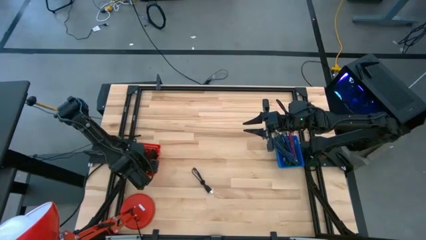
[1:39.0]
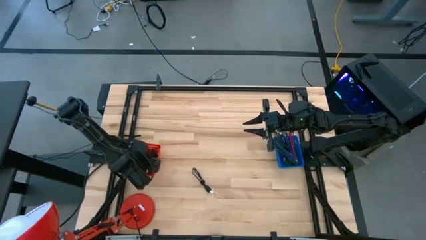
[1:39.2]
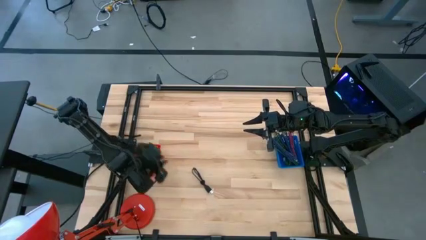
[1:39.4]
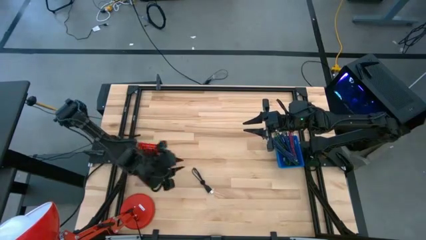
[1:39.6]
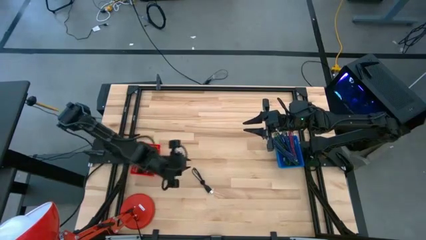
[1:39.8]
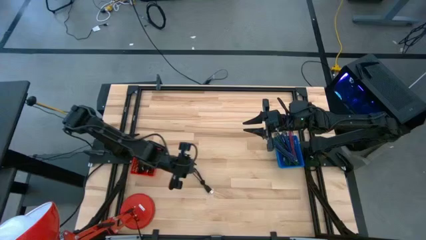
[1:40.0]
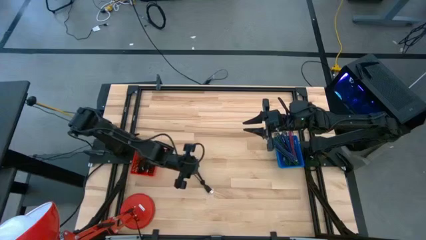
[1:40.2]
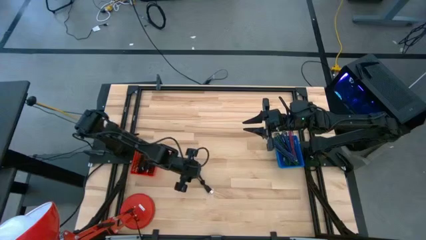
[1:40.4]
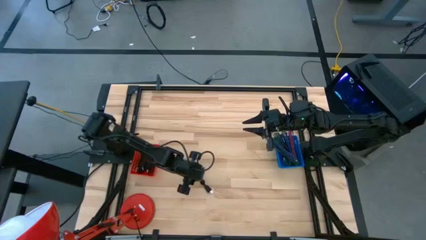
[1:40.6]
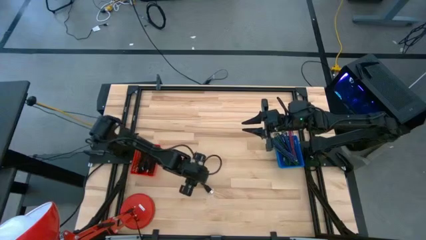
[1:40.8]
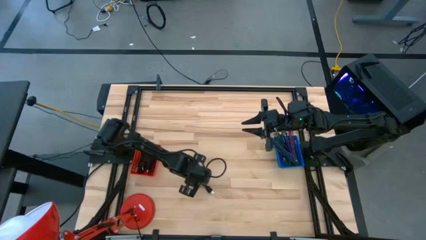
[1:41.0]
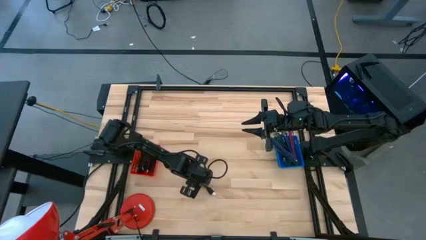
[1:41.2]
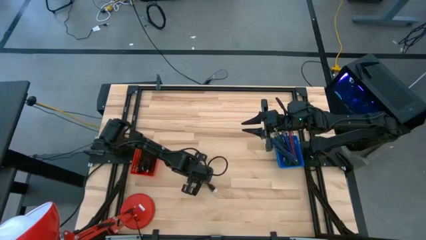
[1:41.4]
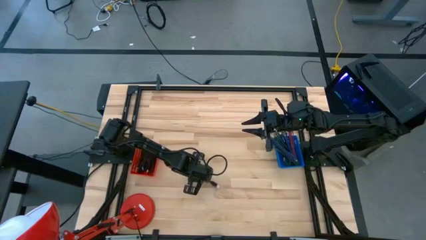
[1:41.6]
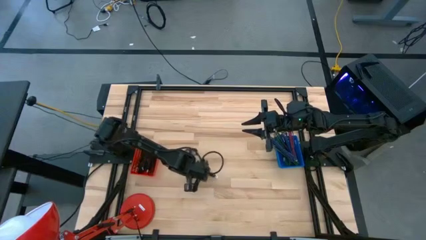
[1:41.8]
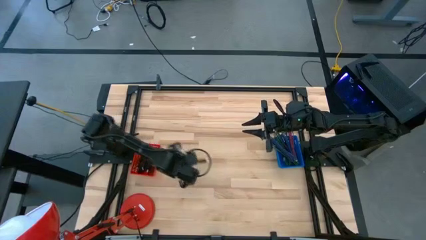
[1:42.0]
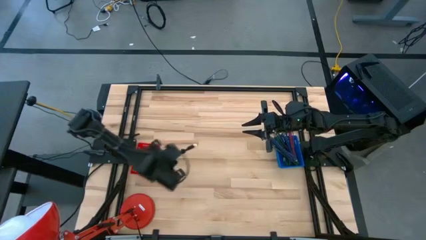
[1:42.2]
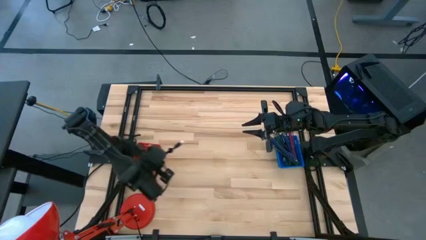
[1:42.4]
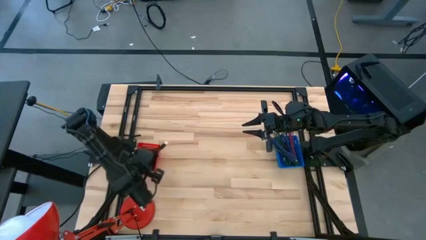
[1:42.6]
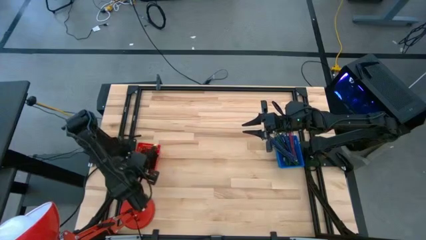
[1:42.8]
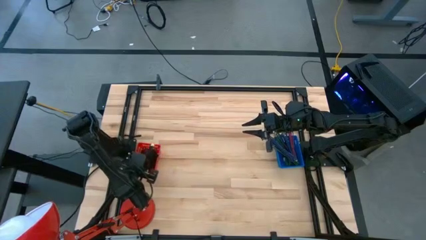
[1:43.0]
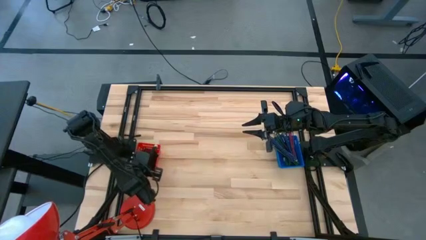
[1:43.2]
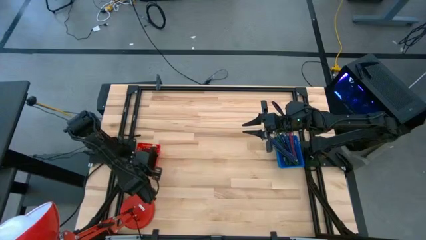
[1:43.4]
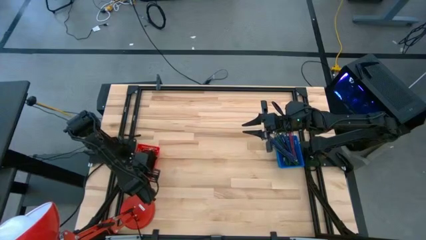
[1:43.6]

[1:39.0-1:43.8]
Task: Pick & Place USB Port
Put the black charger cable into the red bin

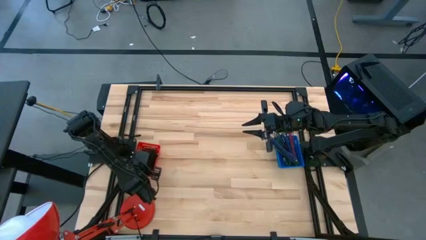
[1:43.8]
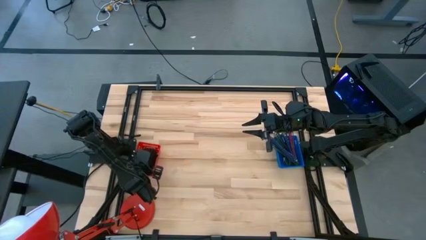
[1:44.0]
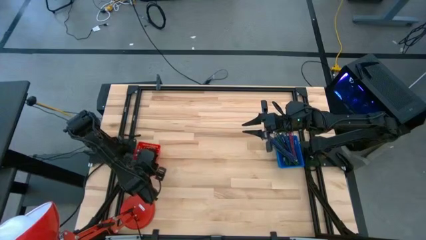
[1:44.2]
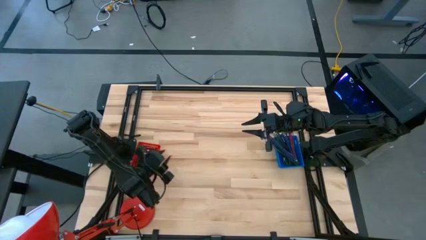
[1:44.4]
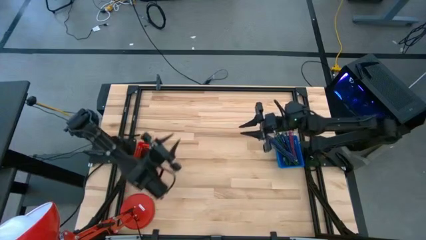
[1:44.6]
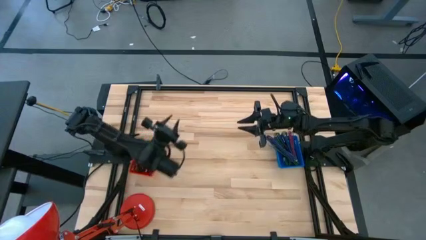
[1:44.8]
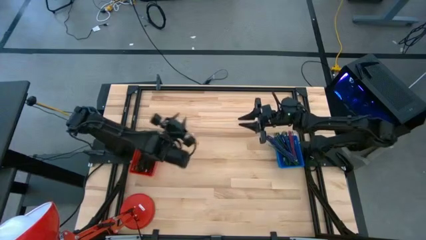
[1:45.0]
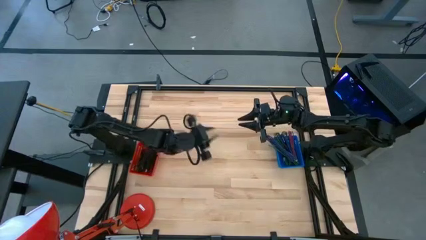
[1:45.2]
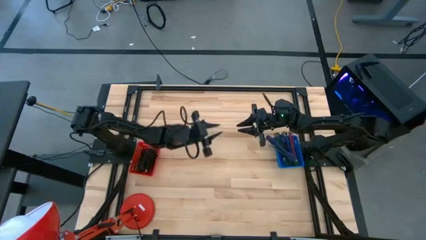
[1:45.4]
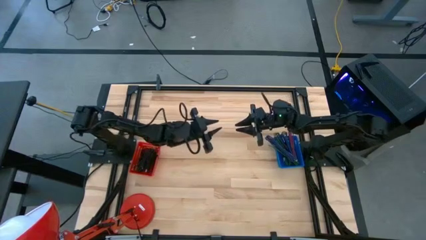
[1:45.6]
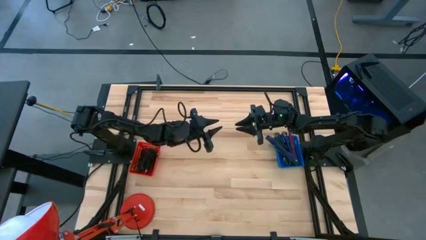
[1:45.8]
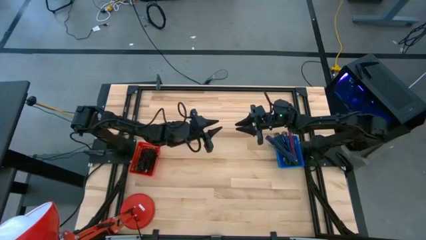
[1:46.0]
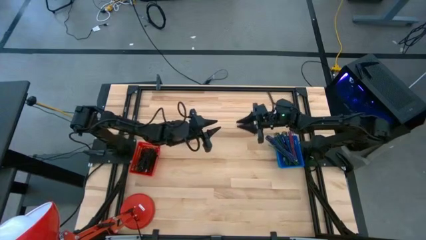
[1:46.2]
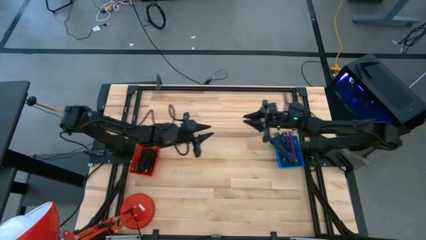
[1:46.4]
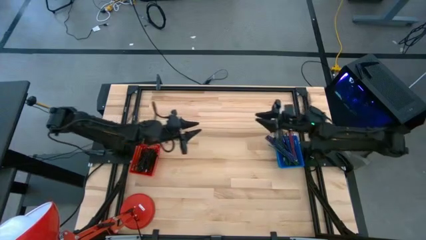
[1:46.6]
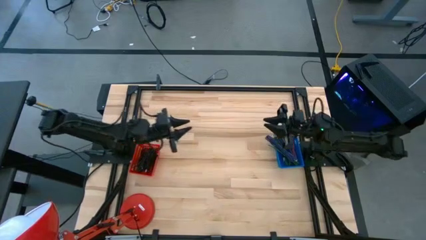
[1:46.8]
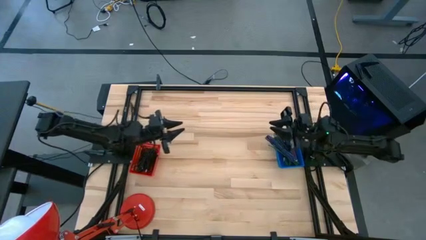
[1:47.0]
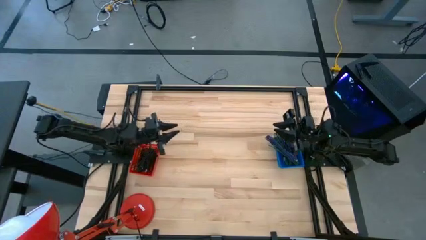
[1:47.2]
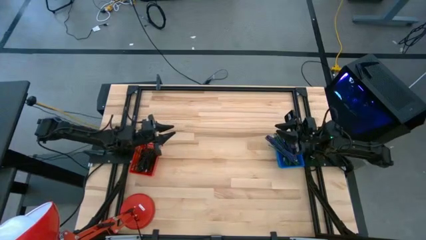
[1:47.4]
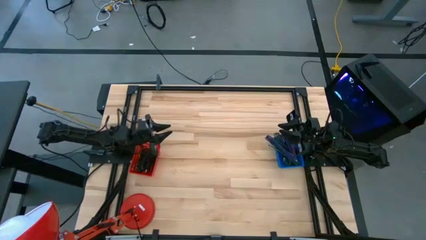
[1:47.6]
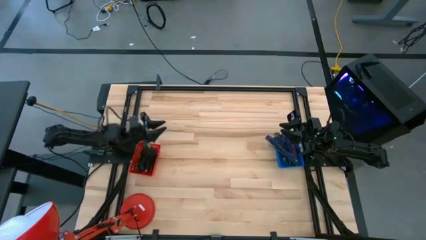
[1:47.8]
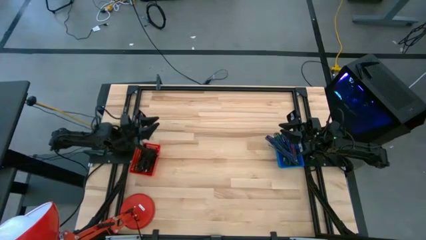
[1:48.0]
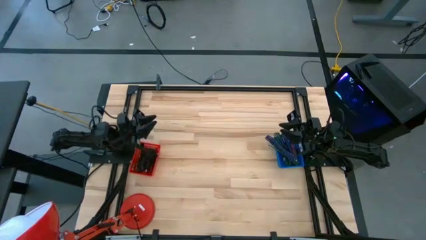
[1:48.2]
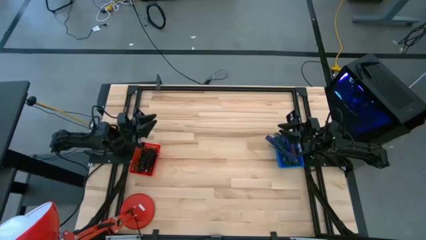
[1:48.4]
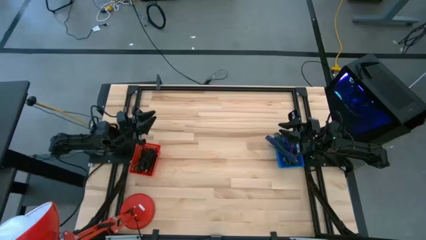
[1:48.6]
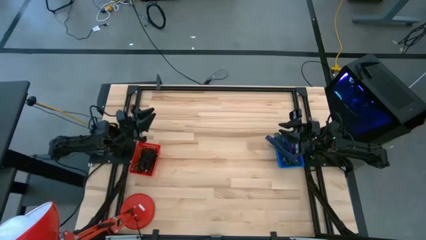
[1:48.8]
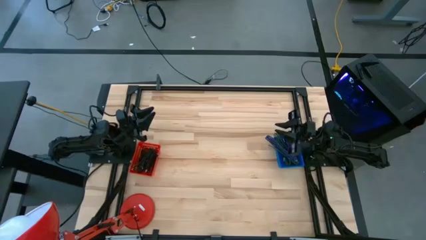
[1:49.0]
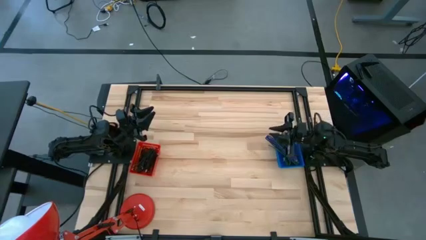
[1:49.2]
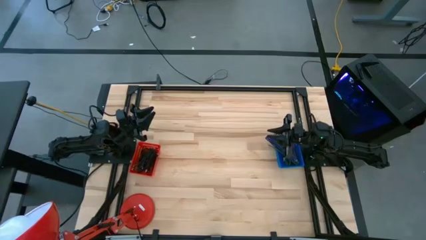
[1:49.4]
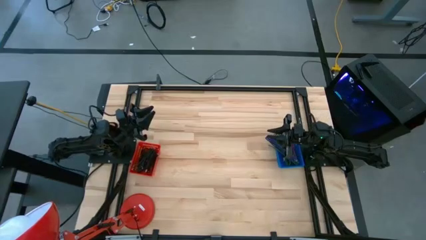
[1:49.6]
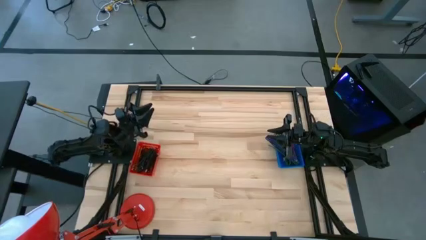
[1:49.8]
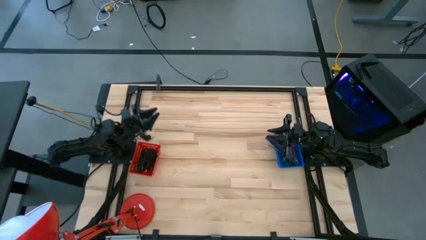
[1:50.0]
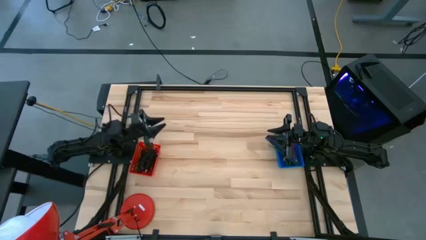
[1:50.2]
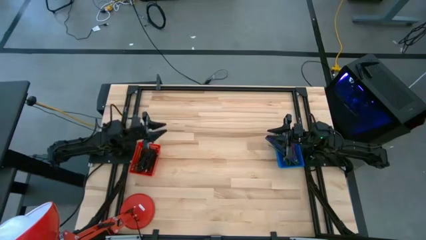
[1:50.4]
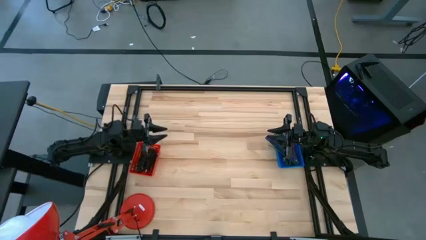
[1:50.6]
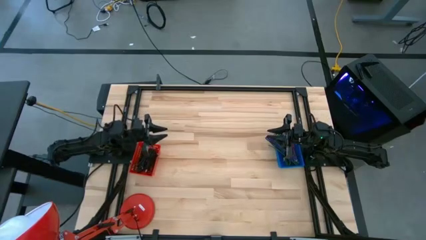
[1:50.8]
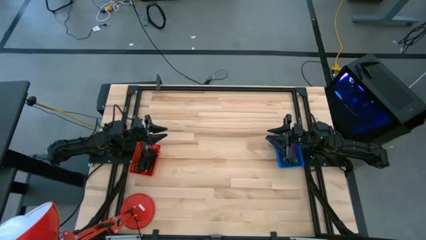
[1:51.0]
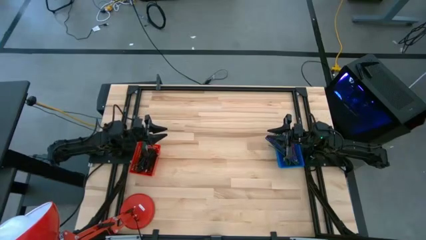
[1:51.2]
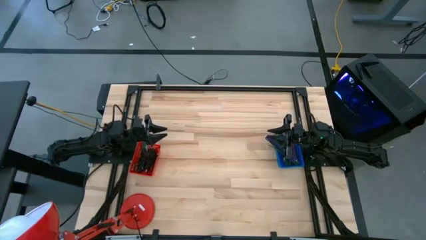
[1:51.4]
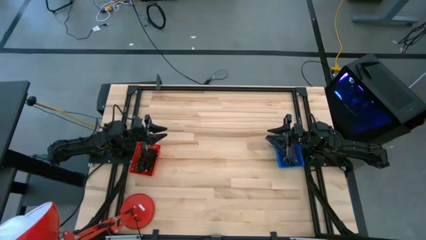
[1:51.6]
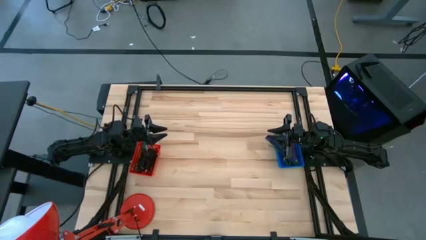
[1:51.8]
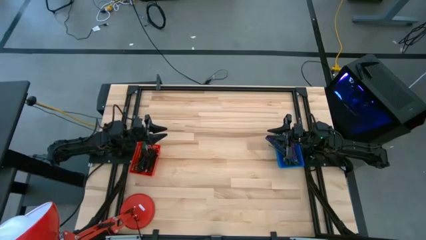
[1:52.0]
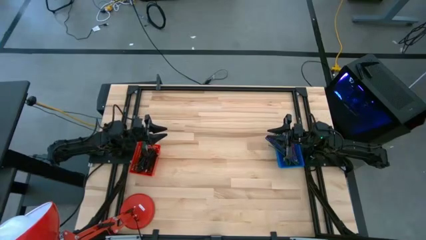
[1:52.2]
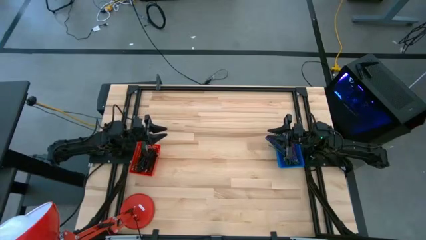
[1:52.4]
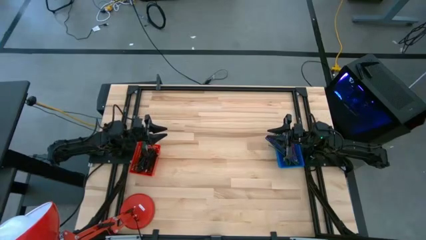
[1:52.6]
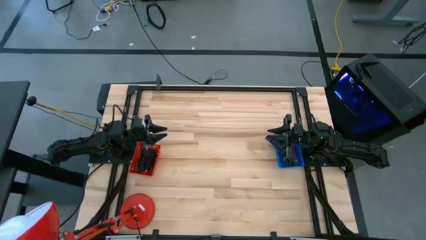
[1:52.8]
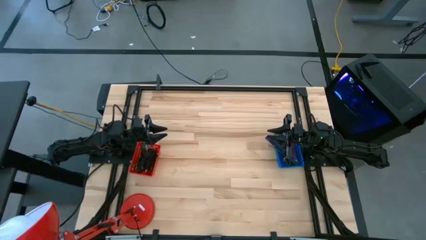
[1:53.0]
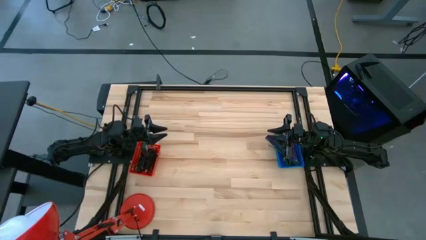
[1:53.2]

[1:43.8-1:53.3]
Return to Home Position

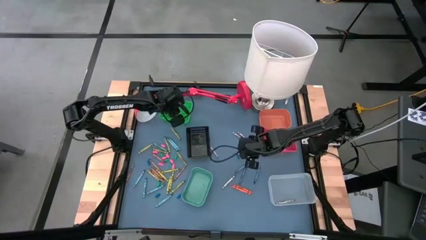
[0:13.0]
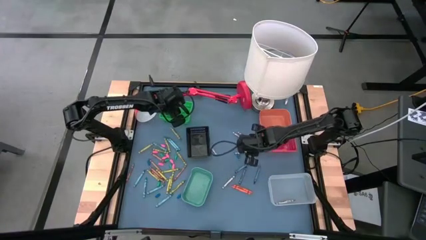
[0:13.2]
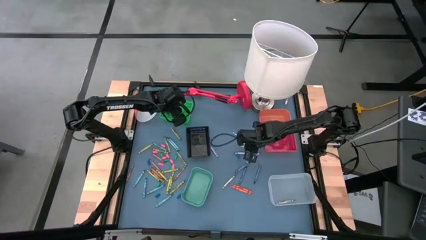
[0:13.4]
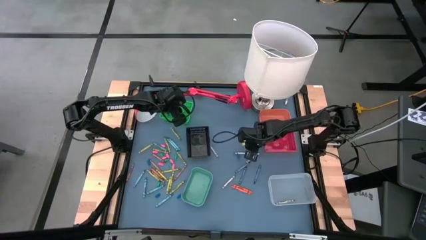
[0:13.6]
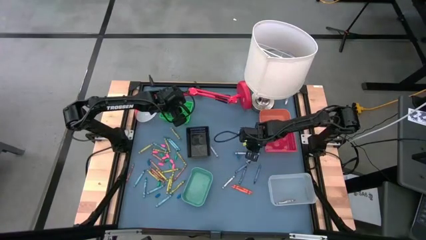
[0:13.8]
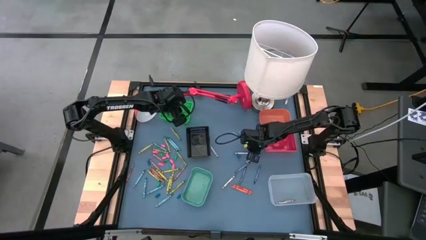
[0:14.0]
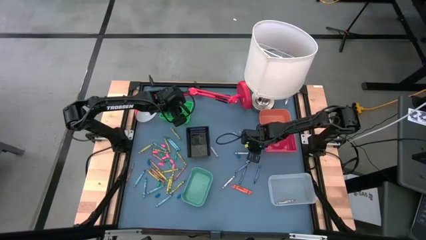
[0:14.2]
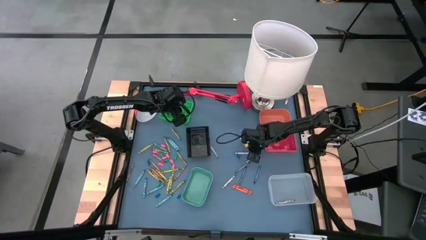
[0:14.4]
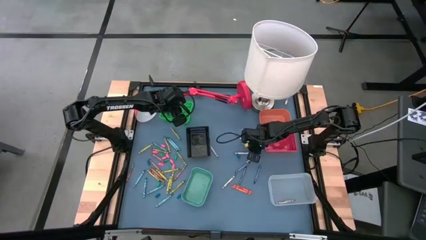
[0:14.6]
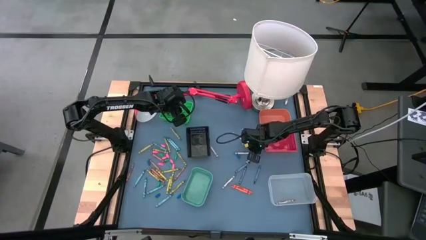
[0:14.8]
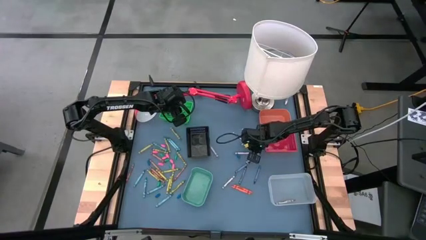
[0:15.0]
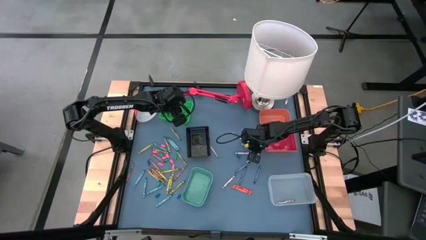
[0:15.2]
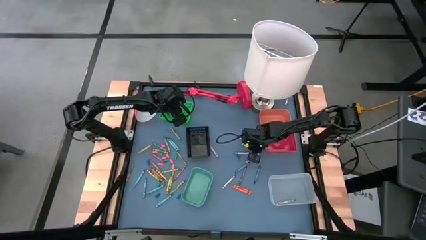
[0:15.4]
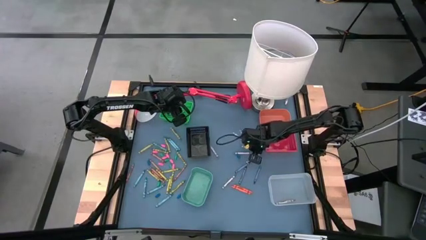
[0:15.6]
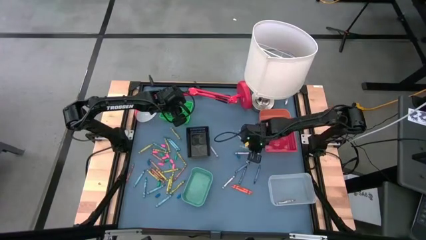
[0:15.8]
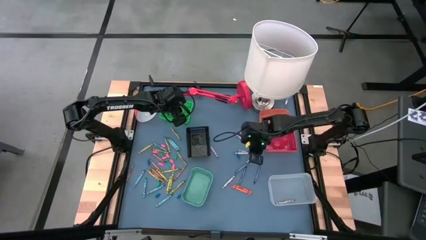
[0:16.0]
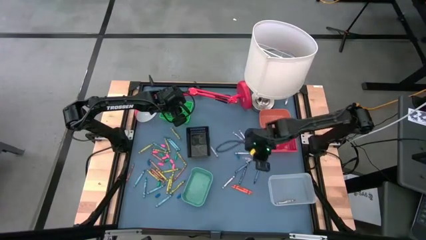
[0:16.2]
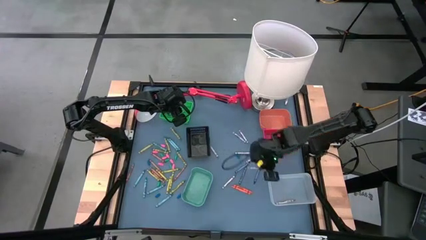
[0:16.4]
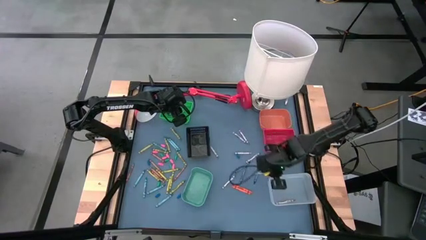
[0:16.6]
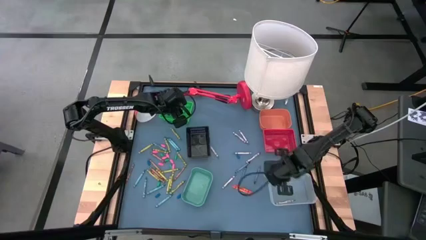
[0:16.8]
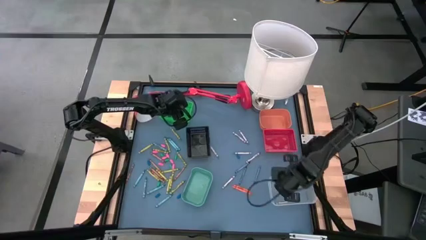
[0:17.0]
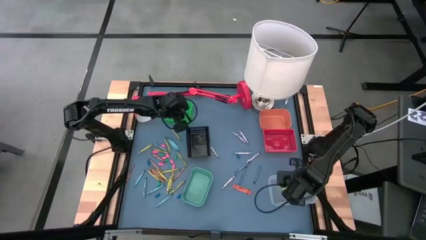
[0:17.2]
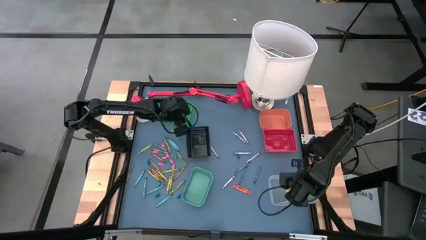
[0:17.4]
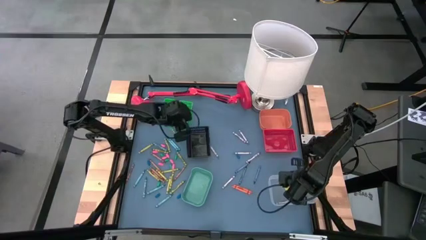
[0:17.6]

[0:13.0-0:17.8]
Task: Sort crayons
Put the gray crayon into the white bin
